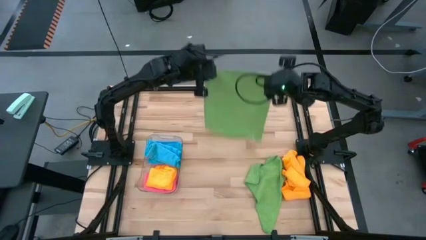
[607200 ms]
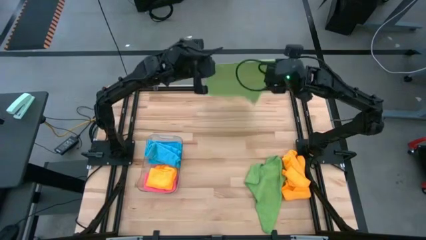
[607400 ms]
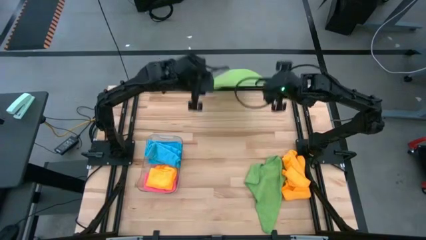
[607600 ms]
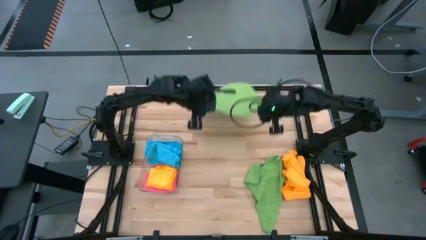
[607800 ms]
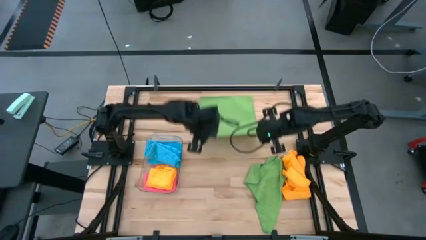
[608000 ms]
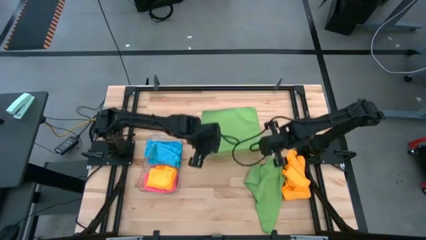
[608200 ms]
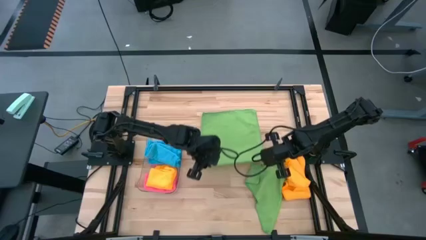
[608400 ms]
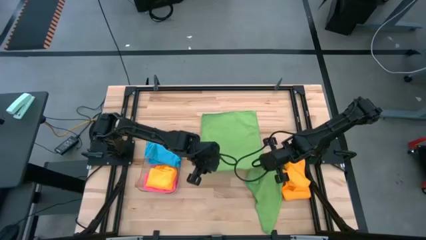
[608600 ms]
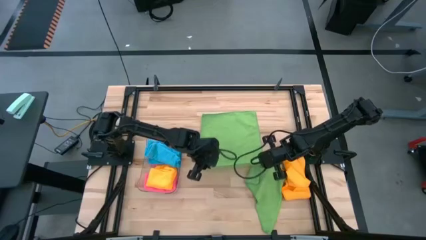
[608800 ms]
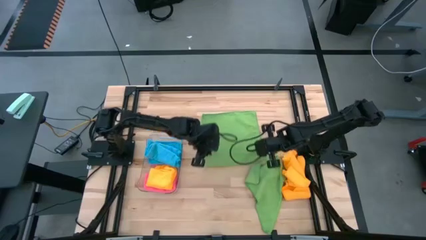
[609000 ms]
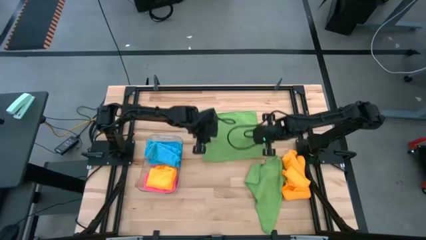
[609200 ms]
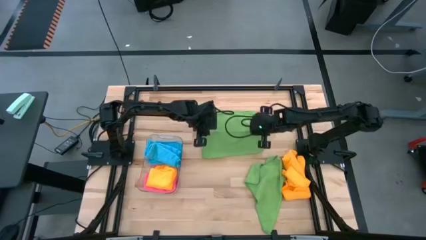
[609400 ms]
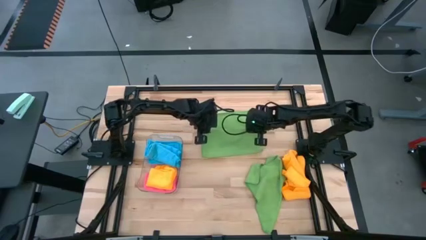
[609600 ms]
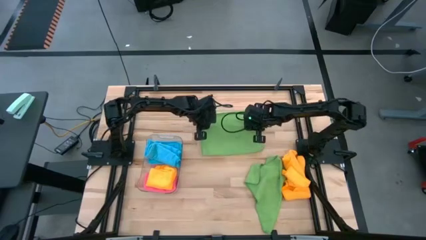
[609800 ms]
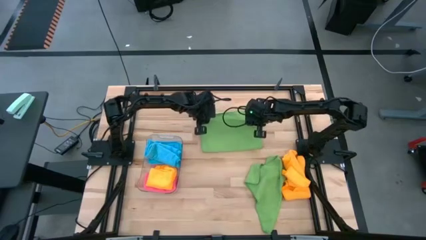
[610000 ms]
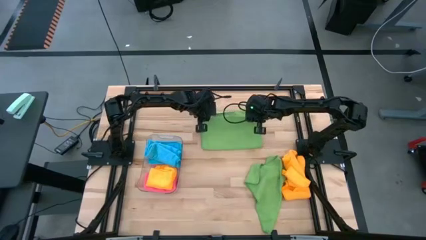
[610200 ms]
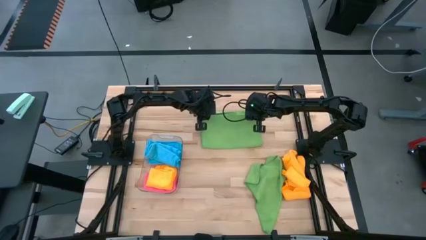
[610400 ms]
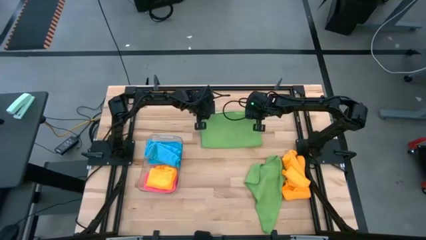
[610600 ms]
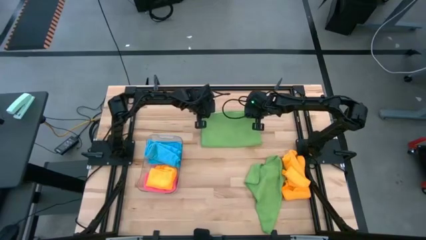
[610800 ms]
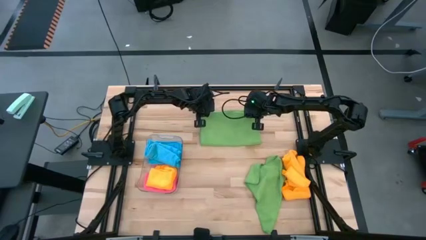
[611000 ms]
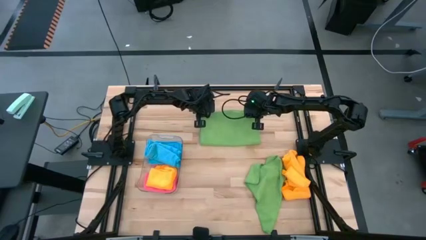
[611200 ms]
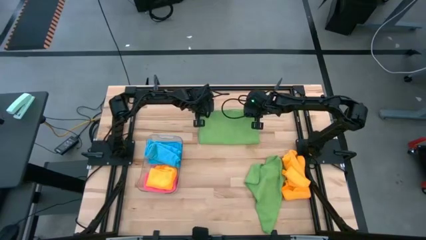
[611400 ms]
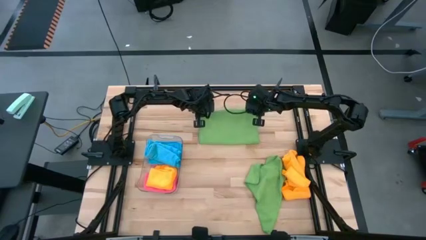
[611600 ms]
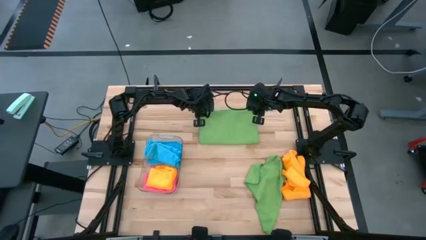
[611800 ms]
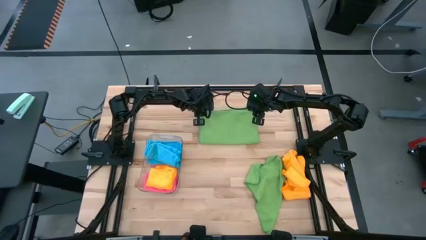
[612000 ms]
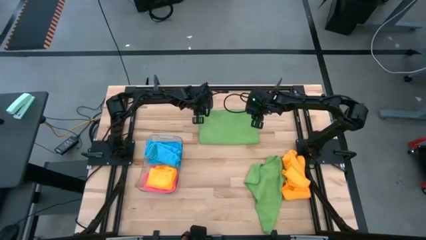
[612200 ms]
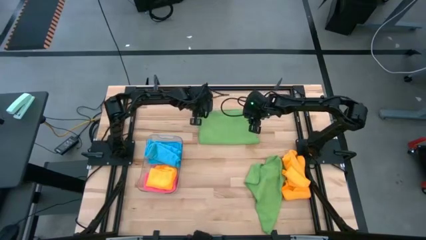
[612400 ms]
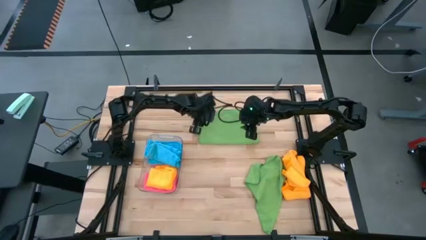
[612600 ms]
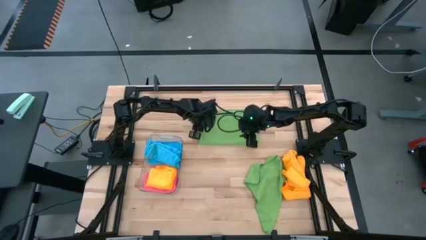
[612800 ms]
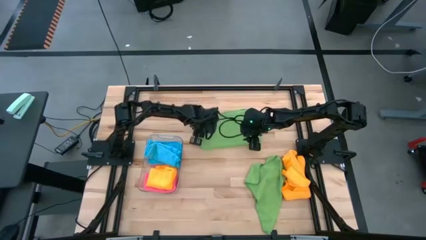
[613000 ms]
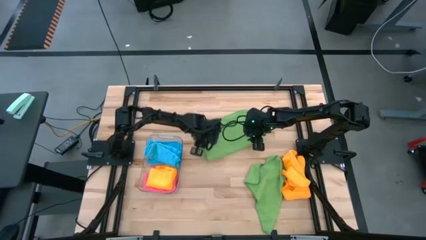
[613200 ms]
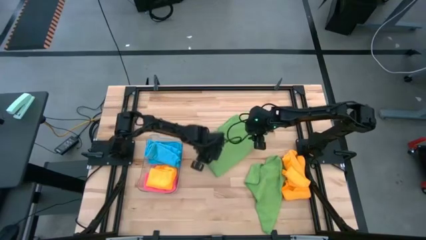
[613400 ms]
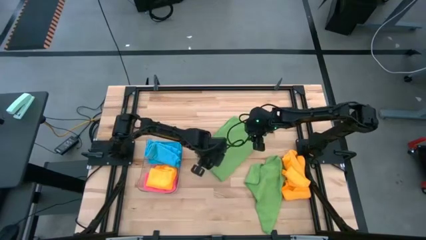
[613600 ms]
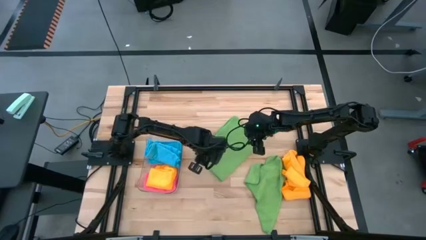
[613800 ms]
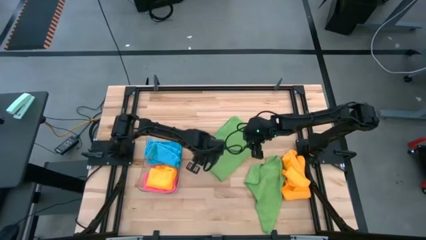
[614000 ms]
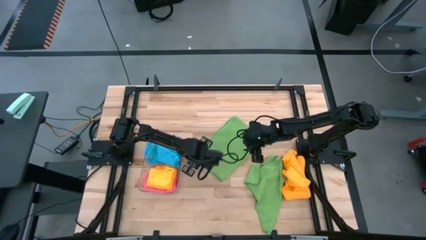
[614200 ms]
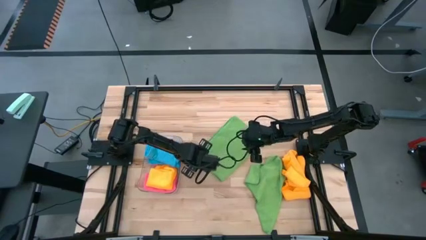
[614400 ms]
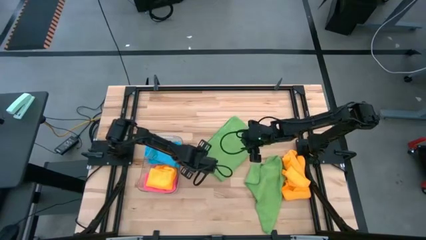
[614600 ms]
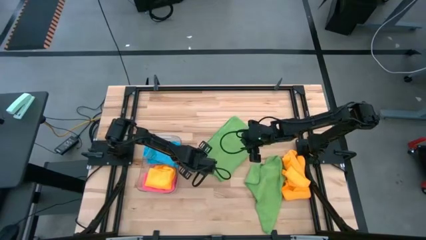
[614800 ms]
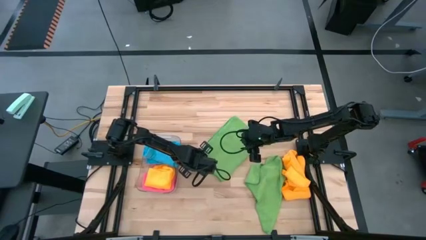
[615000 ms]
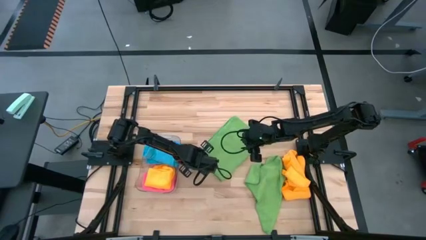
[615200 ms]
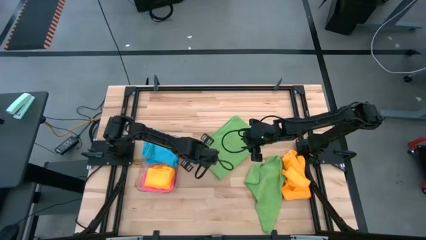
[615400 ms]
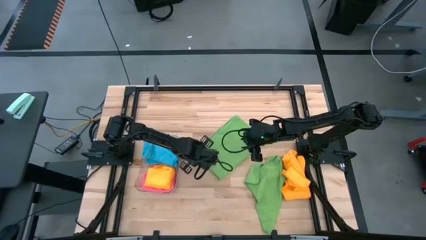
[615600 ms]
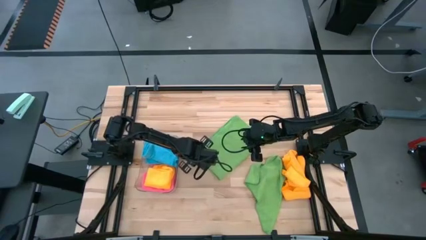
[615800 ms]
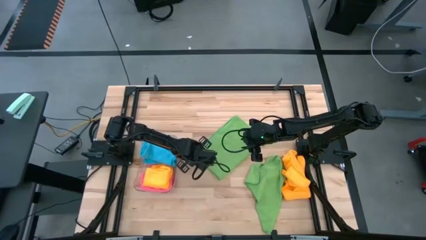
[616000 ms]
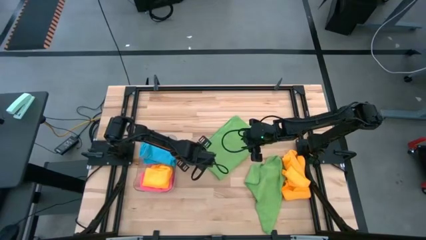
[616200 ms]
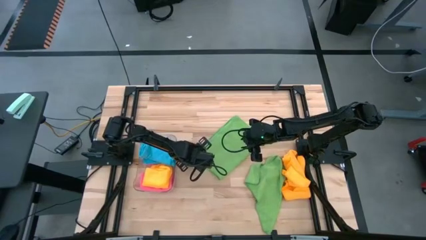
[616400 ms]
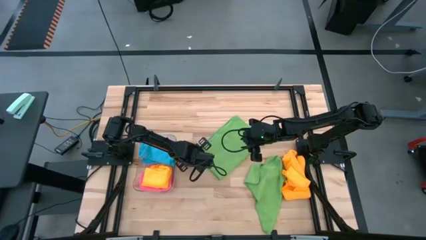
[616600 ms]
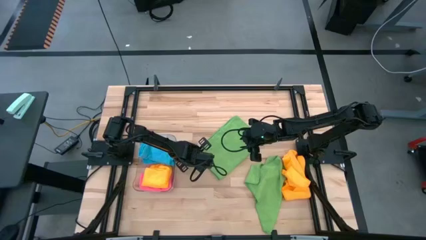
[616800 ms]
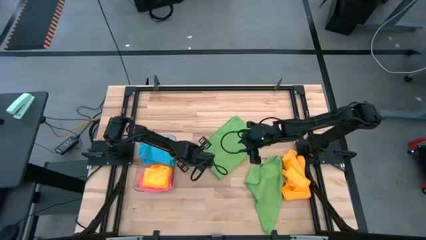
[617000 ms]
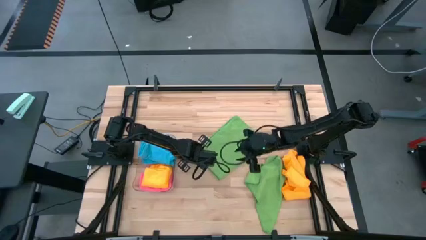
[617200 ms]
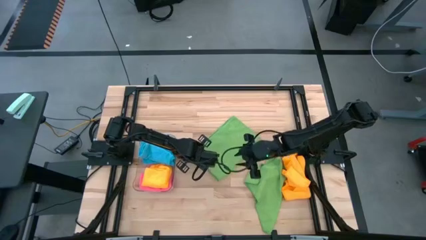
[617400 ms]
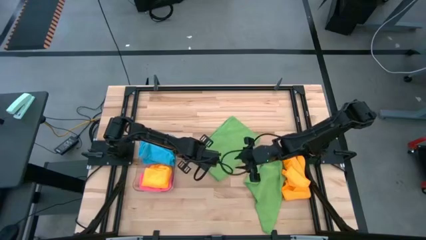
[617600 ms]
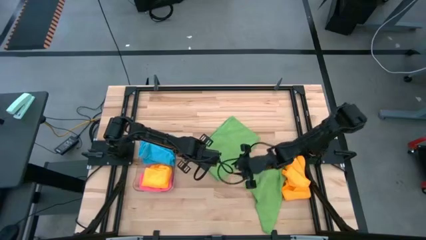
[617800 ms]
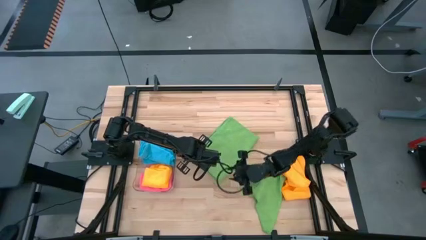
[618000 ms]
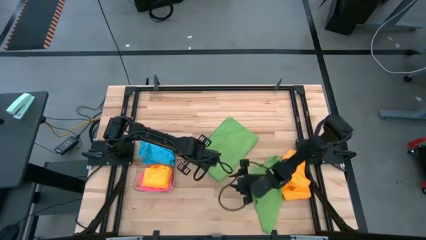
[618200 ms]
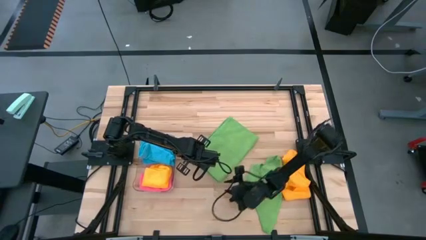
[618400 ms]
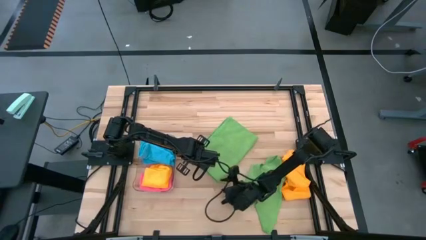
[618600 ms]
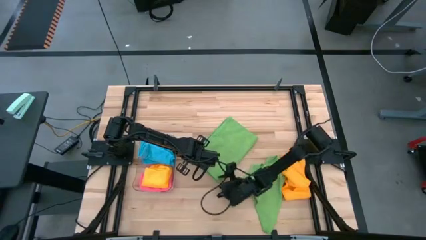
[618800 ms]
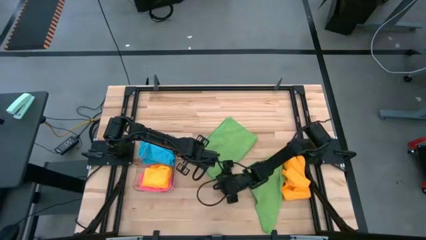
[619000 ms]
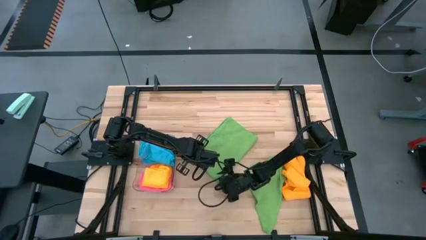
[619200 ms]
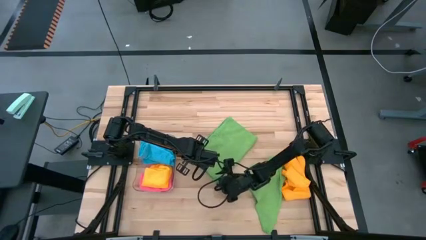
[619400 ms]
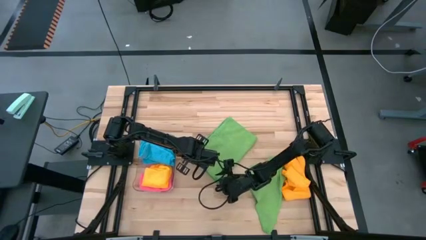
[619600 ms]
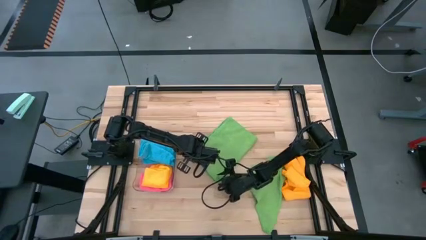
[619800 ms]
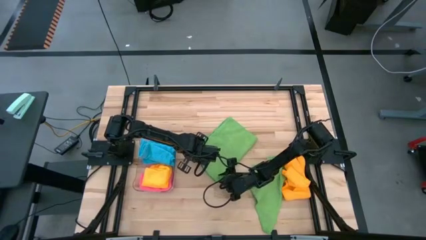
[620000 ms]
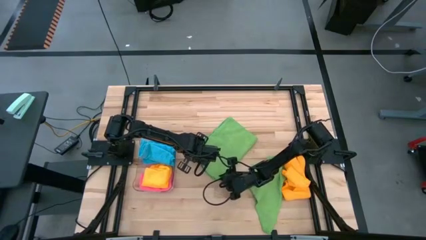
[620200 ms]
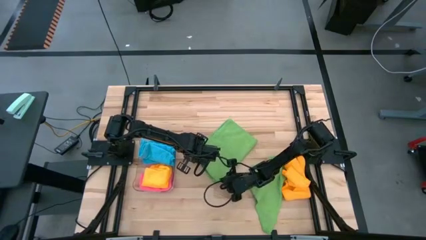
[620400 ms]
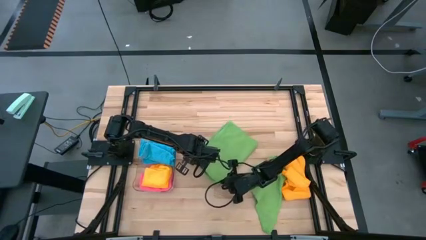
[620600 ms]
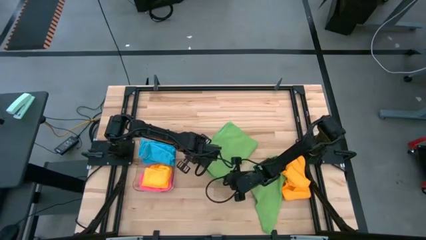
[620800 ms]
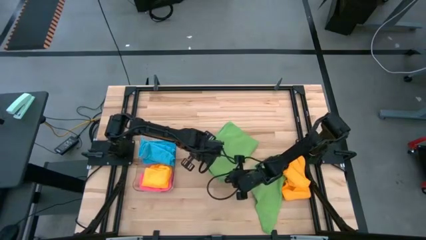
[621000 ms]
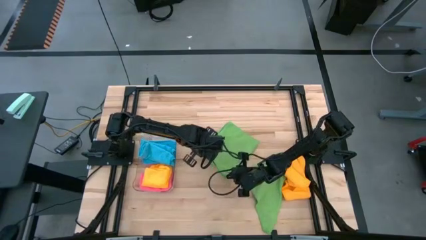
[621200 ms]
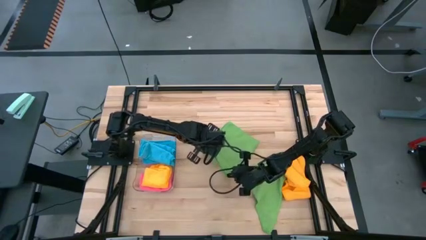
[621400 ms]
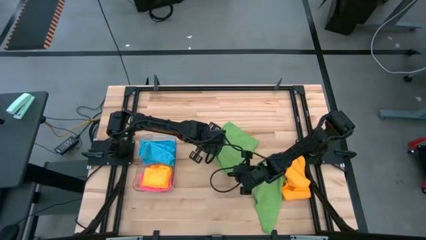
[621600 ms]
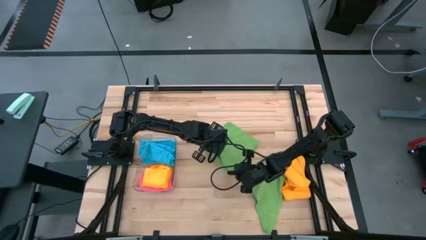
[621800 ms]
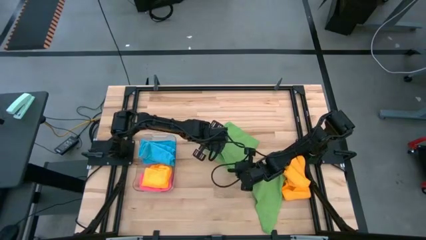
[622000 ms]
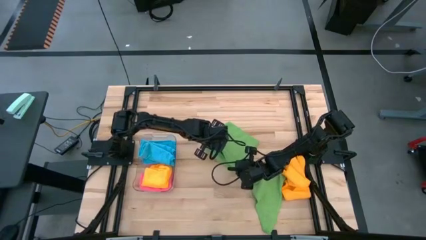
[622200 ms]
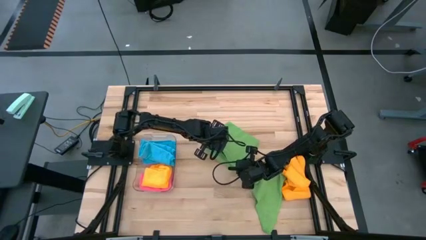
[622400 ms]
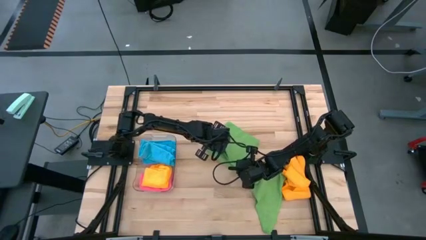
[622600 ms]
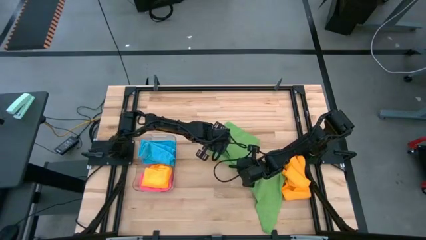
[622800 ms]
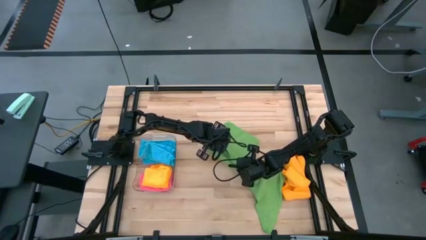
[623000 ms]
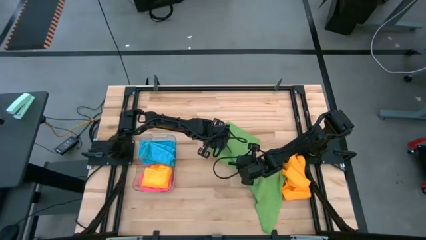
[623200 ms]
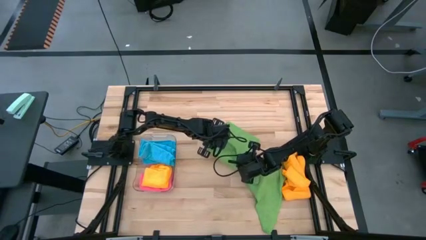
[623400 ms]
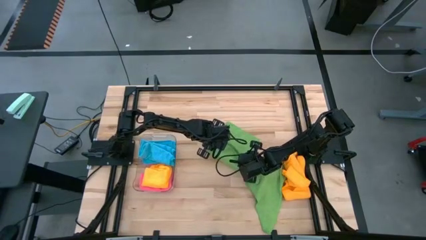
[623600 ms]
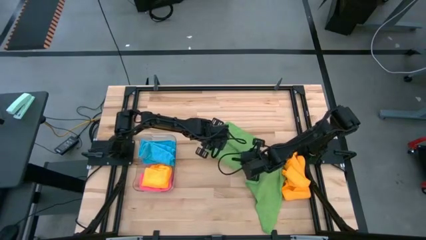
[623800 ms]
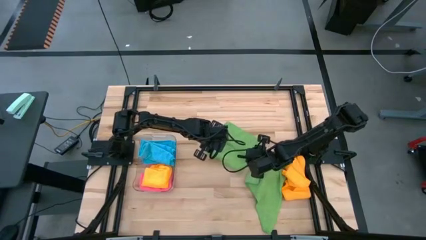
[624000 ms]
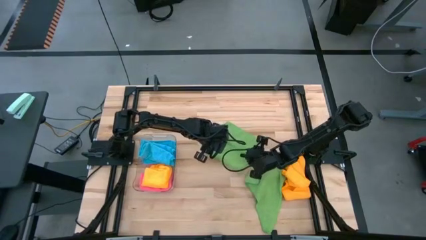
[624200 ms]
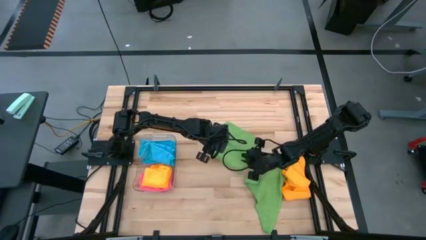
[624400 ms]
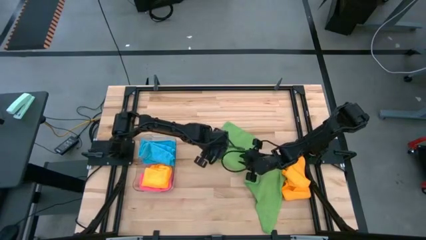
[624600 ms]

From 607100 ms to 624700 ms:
Task: Fold microfiber towels
Fold the left green microfiber cloth
